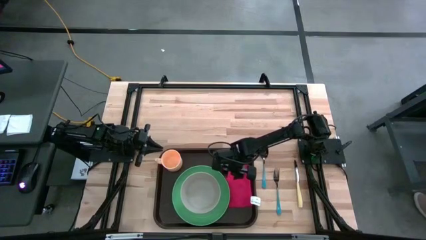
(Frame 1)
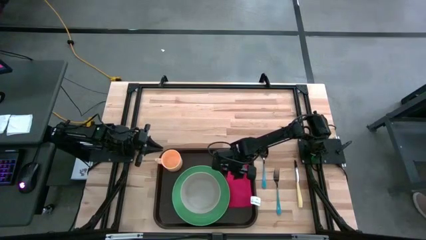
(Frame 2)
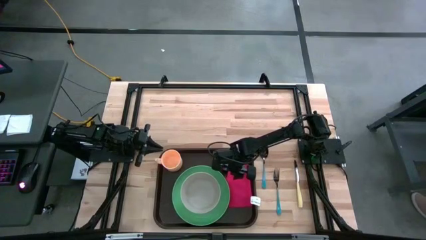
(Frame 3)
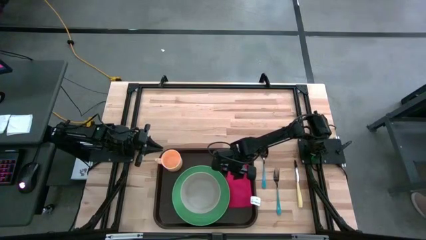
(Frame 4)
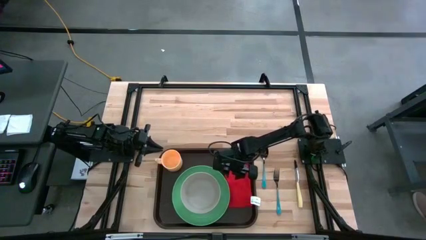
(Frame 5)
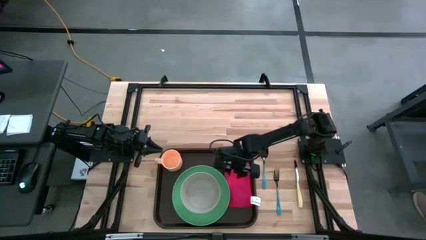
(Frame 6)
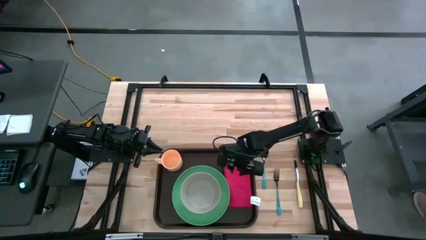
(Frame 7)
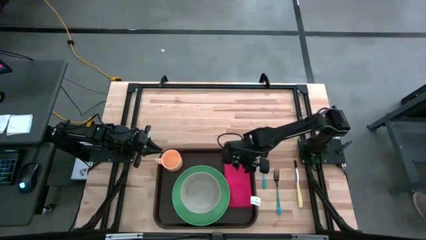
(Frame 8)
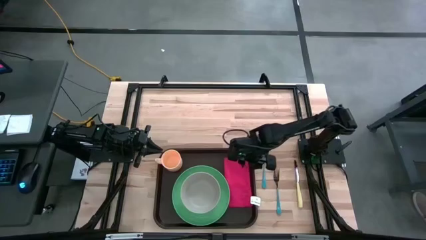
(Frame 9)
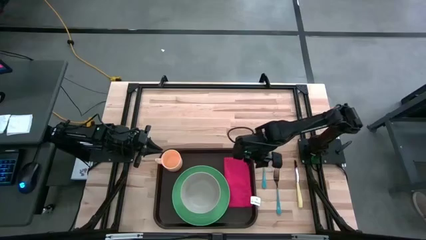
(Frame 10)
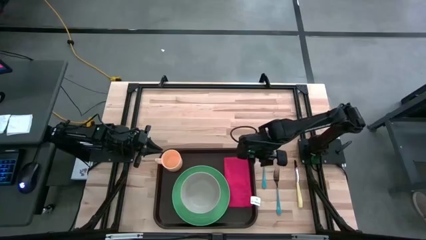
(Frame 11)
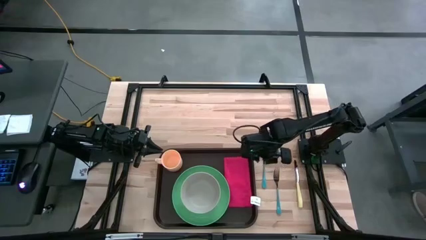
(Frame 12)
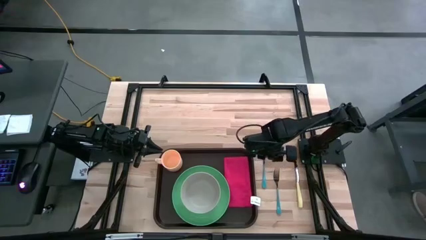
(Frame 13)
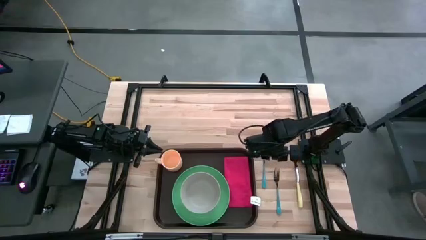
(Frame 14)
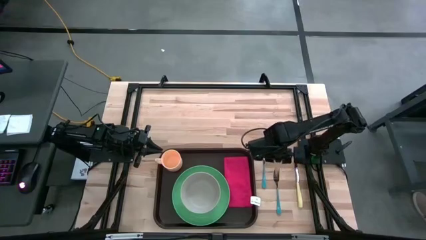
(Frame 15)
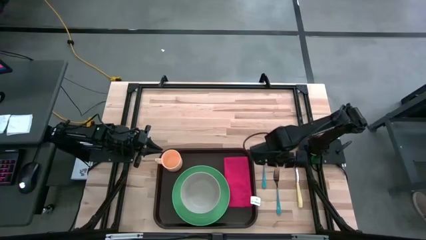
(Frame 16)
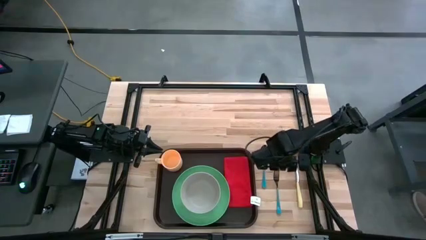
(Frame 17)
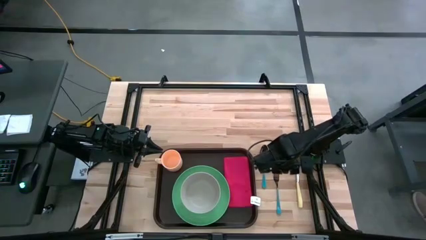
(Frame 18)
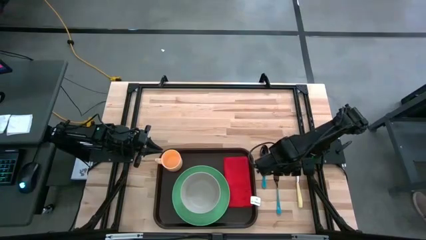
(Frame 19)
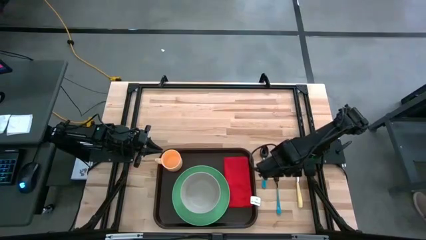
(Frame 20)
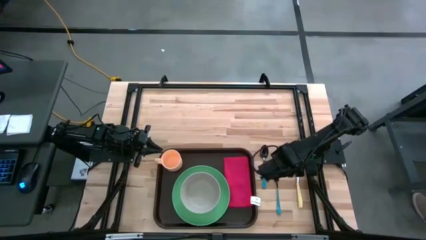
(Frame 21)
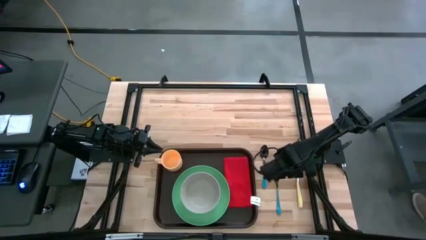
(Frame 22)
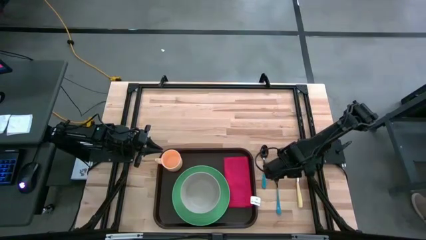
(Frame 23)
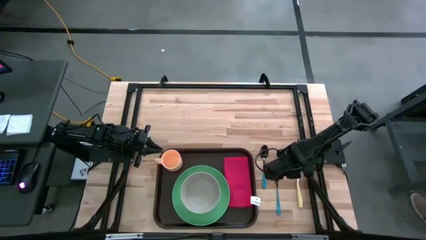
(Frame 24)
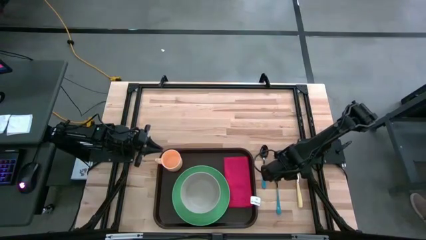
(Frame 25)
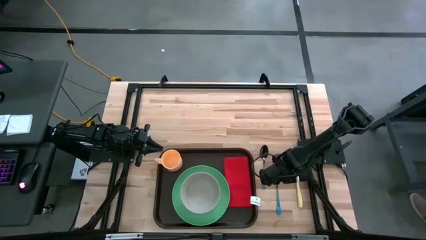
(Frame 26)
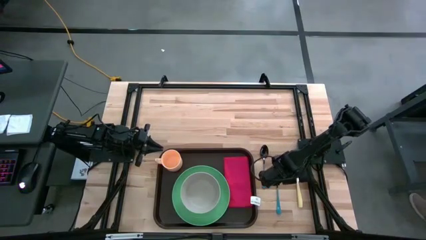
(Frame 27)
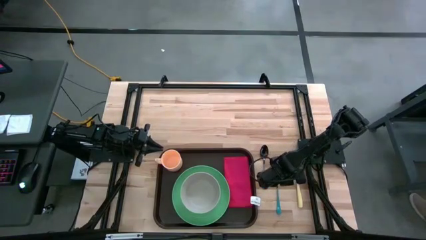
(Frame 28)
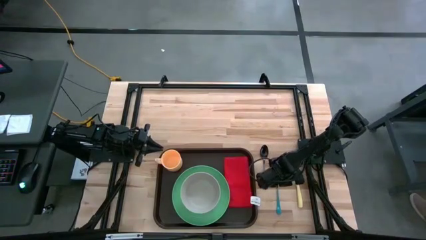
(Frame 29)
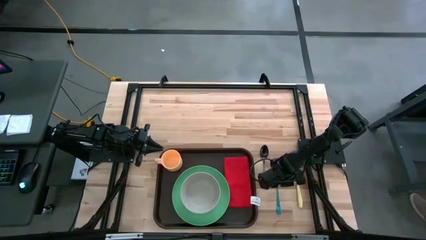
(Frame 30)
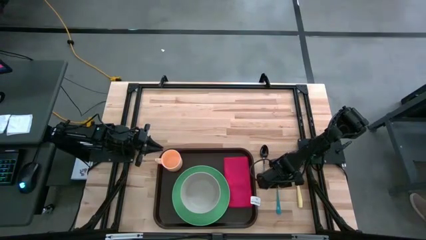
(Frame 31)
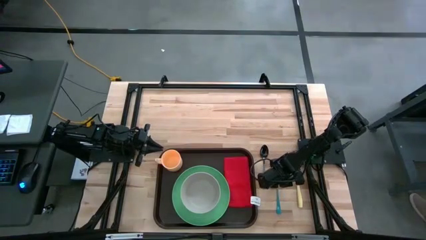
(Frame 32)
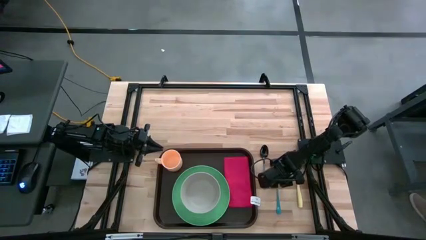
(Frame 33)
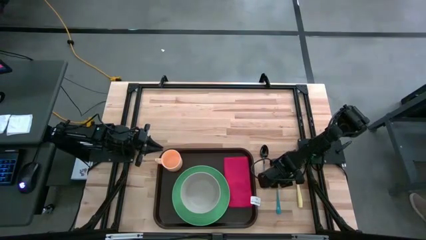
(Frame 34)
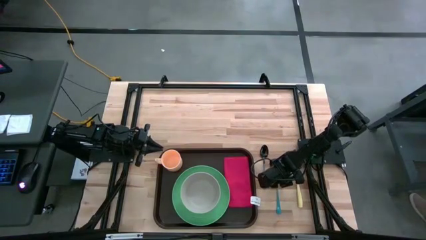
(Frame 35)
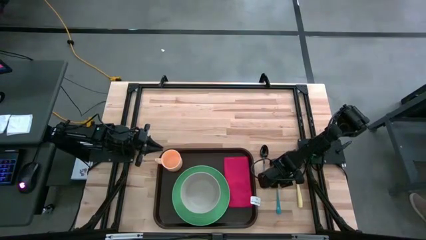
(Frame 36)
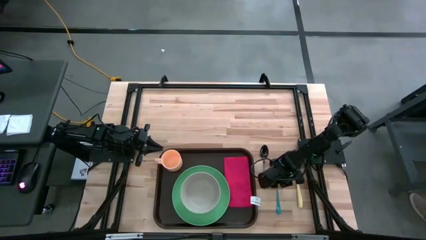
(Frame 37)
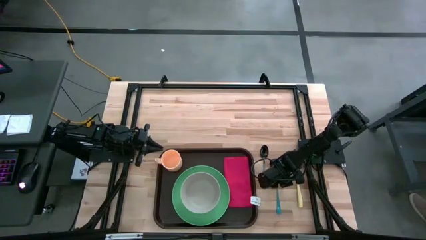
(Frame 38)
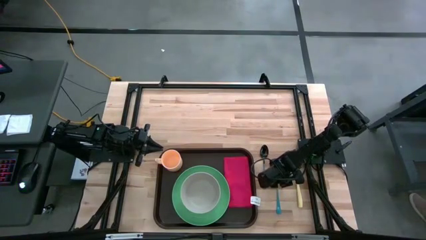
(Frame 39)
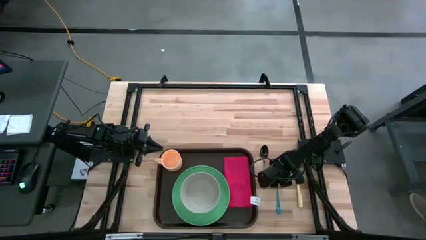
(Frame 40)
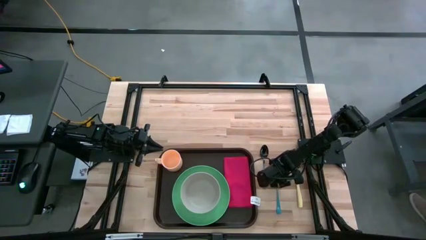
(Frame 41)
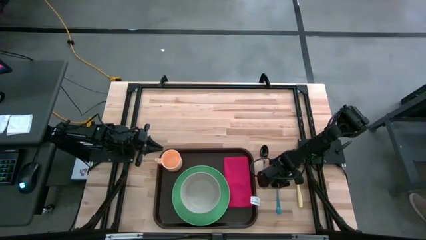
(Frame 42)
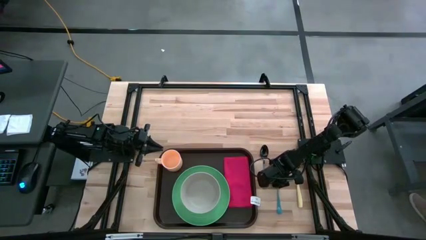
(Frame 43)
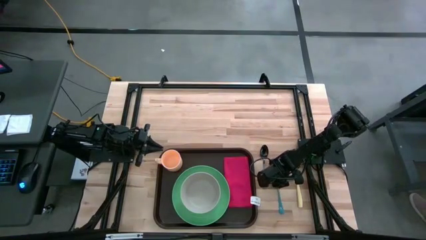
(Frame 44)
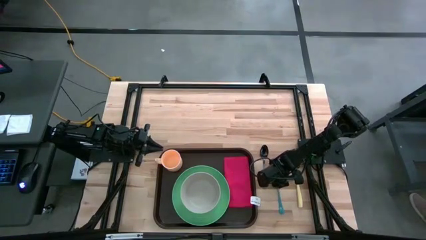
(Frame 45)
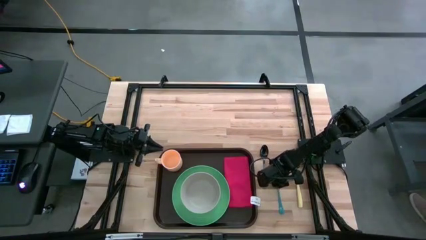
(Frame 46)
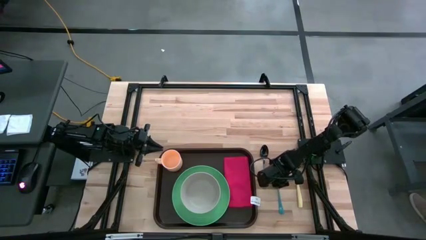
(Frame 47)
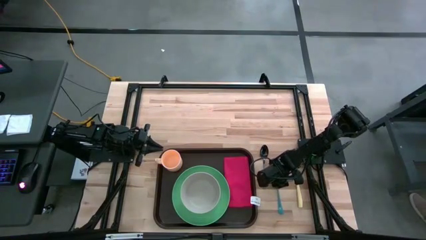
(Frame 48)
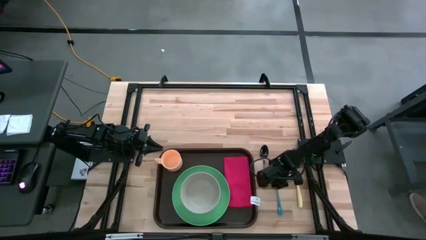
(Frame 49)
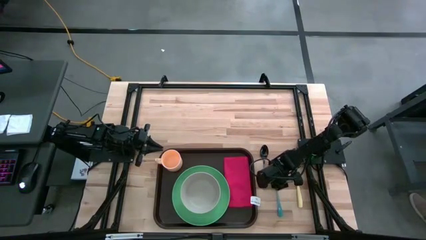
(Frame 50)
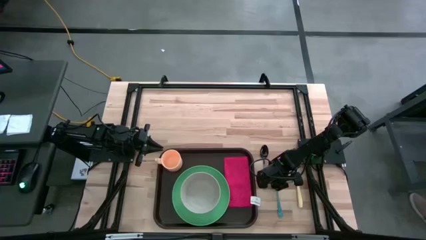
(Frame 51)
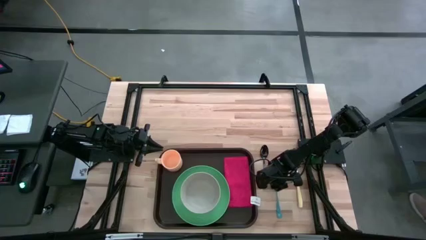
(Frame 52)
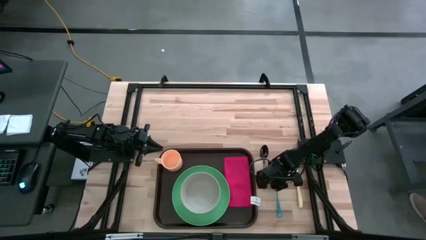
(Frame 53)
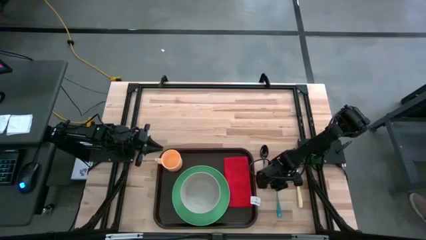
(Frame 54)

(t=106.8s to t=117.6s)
Task: Set up tray
Put the blue fork on top of the red table napkin

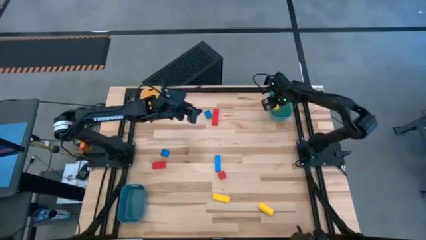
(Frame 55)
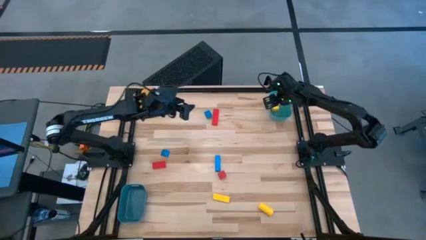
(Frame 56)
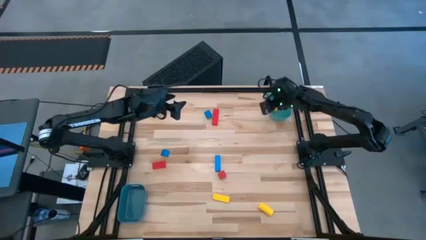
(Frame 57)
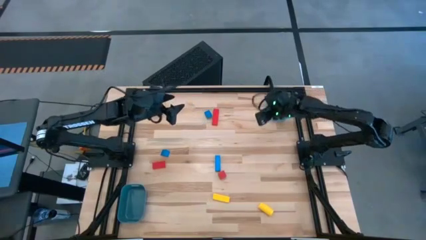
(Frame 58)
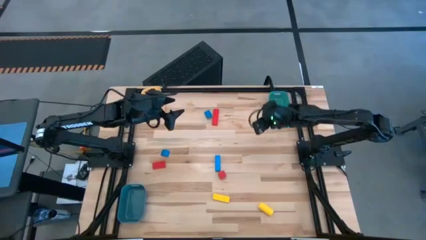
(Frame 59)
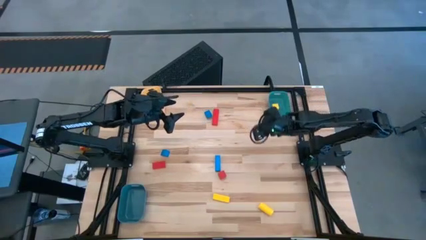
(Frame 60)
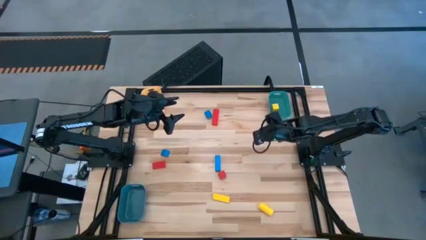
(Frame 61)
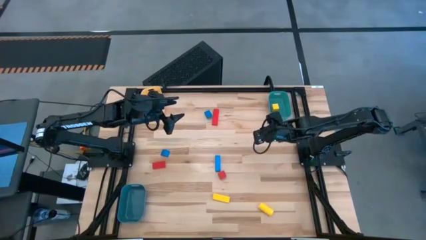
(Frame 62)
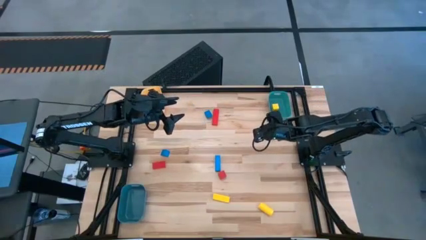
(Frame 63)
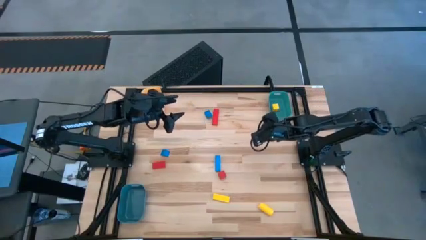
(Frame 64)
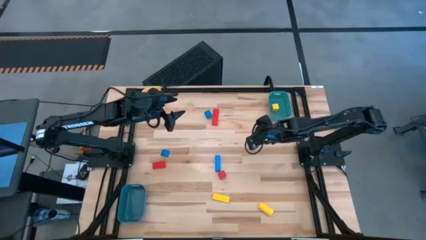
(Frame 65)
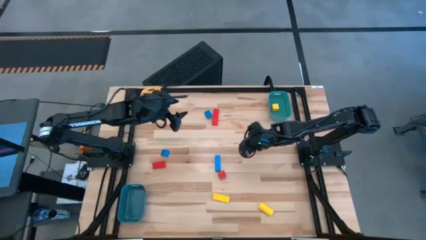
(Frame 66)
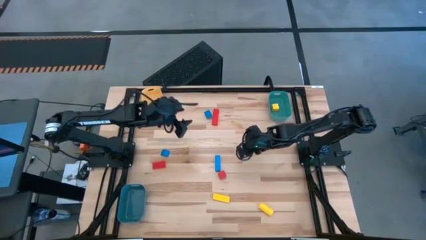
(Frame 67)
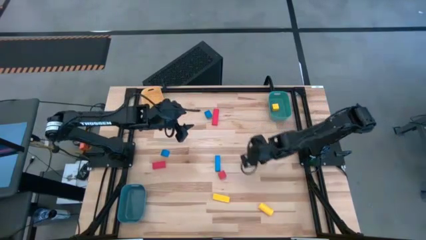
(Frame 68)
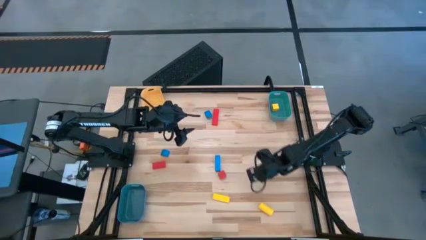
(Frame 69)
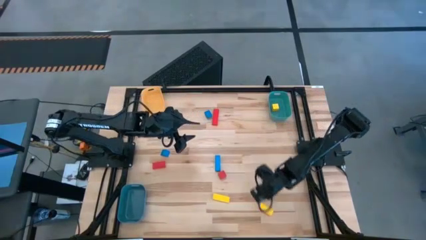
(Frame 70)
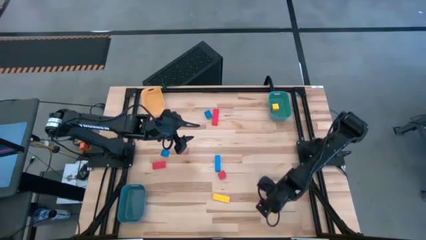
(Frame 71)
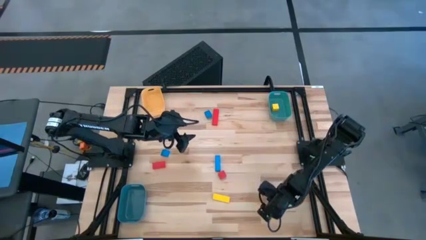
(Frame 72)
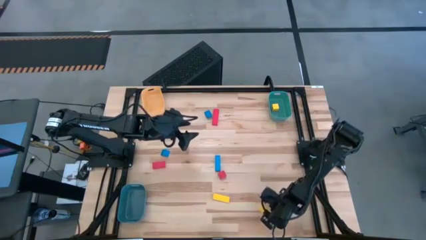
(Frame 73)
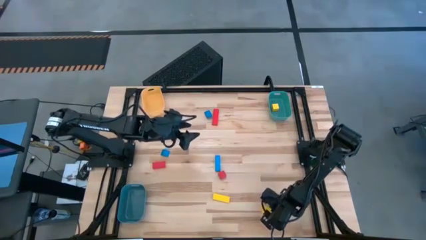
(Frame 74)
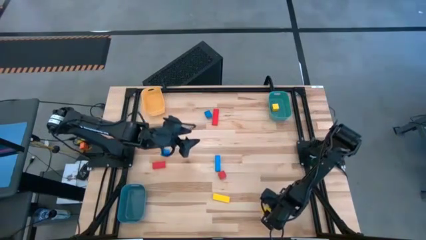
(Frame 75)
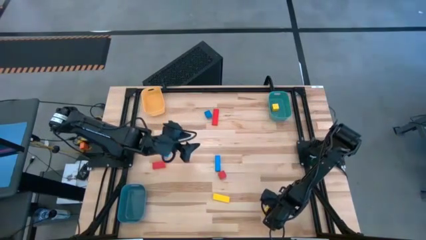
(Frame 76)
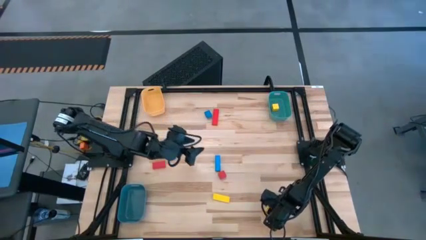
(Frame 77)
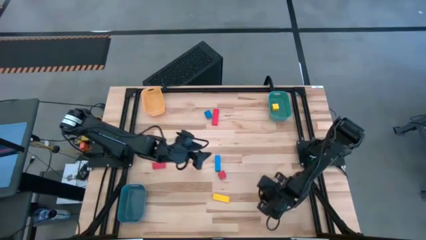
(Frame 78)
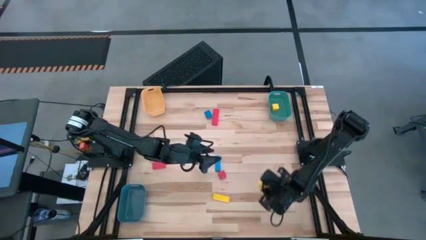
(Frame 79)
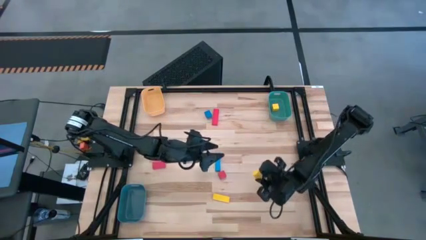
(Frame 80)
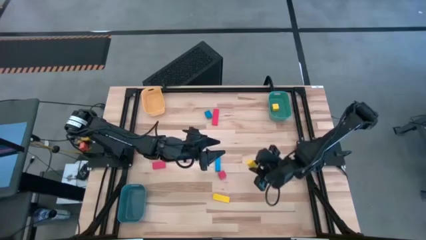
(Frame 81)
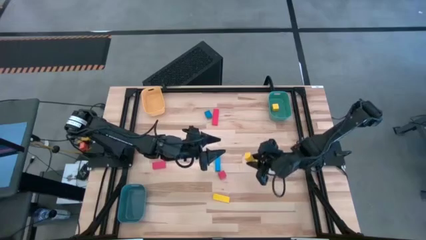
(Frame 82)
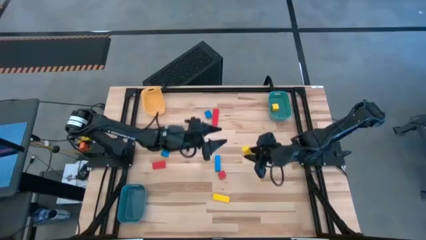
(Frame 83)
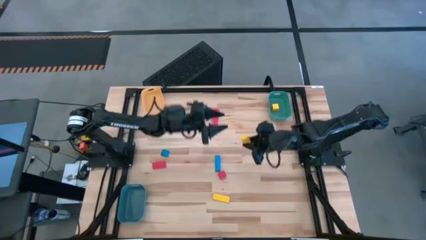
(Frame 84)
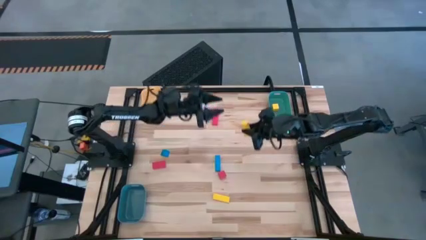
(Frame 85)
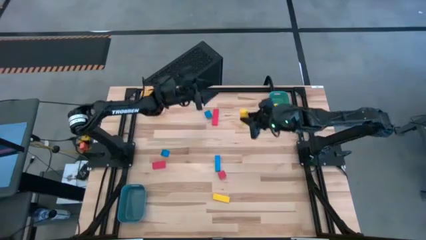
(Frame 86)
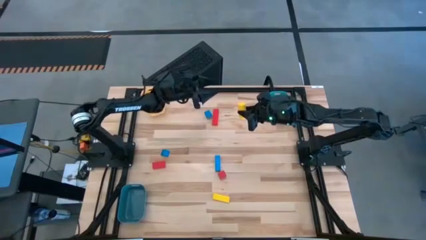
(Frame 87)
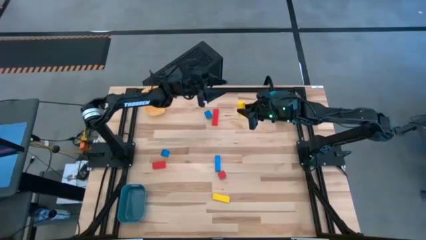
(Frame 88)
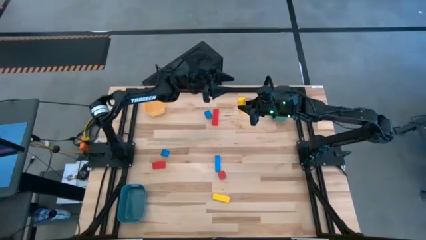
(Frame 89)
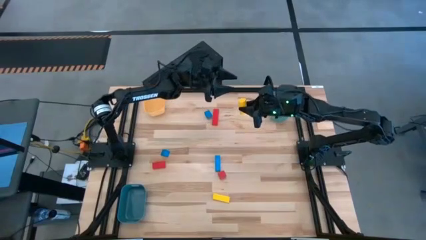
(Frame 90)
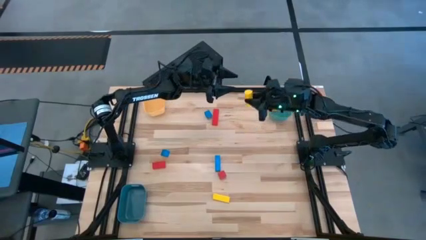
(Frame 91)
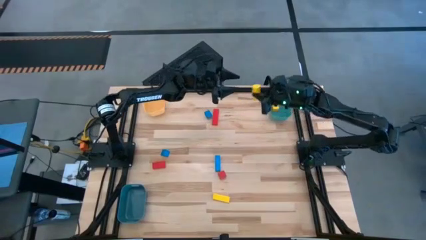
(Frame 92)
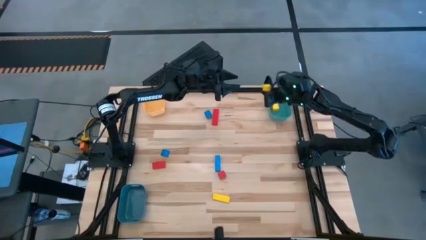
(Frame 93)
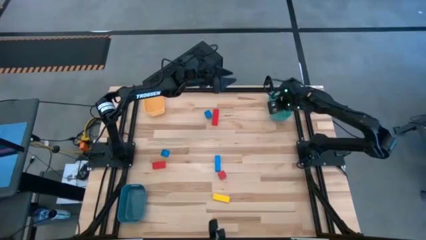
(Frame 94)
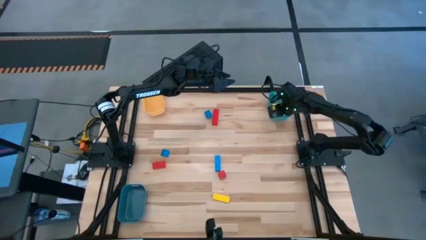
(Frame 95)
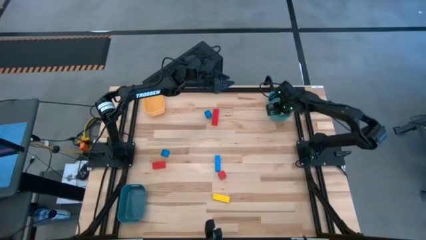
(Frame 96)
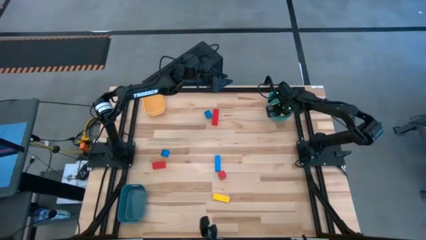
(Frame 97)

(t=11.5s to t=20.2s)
Task: Sort & place blocks by color
Put the right yellow block into the light blue bin
